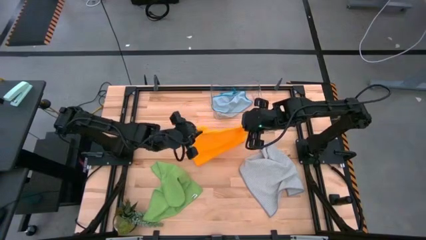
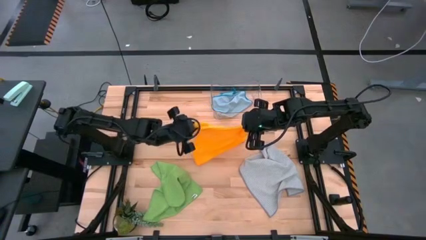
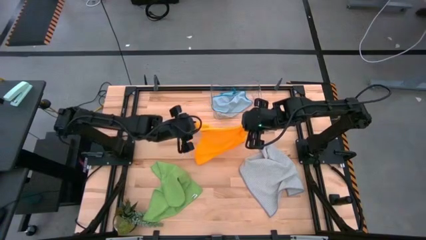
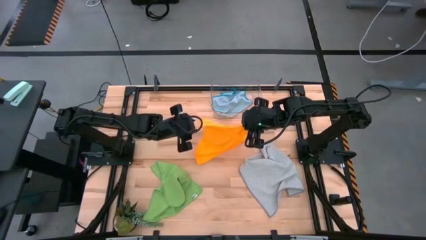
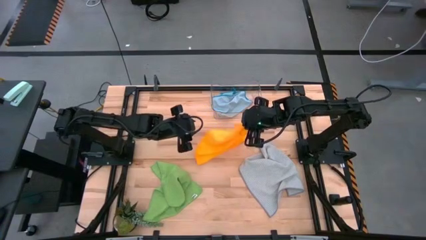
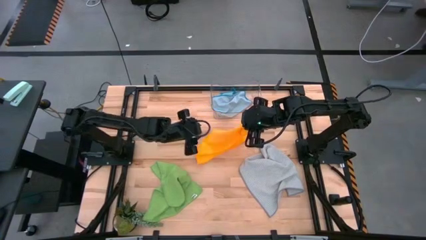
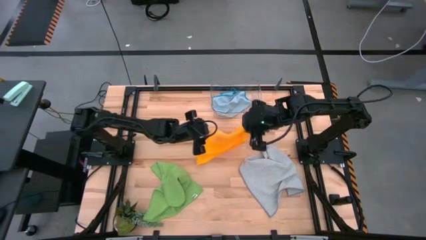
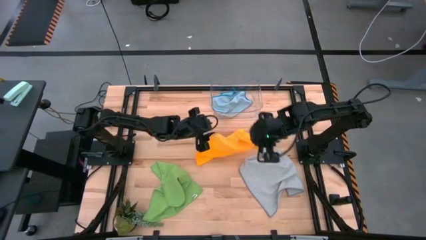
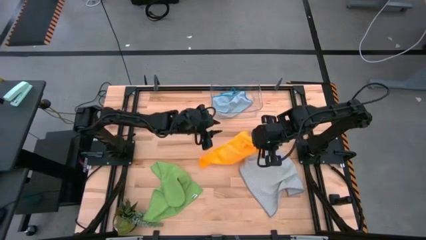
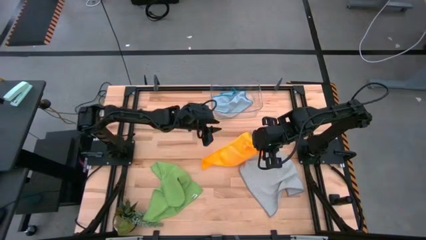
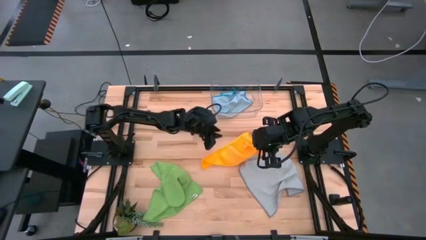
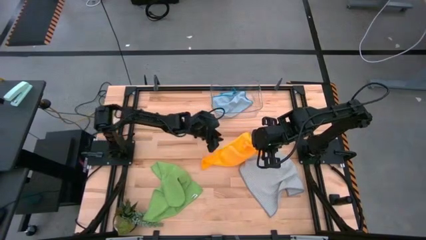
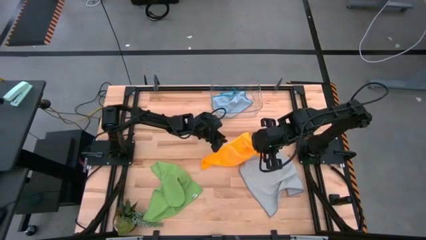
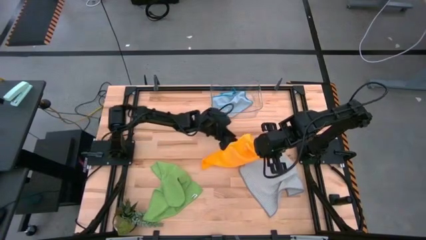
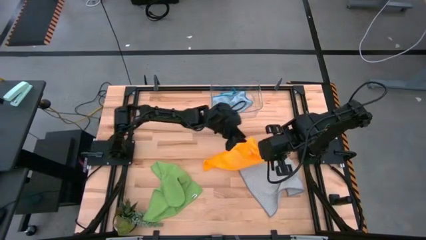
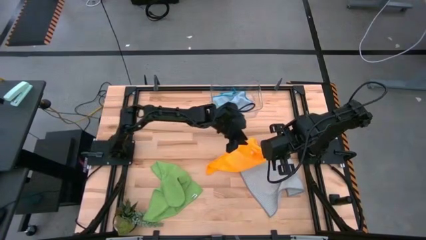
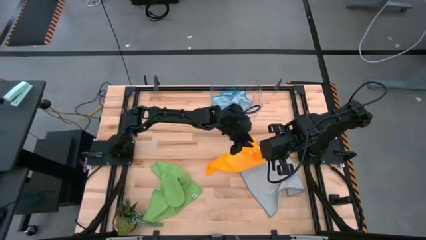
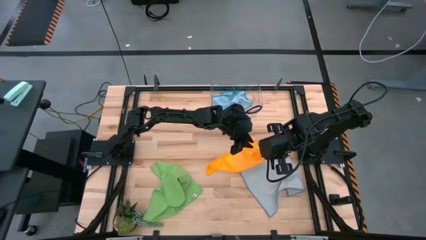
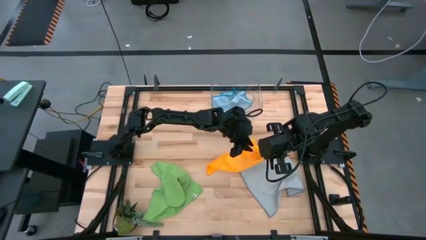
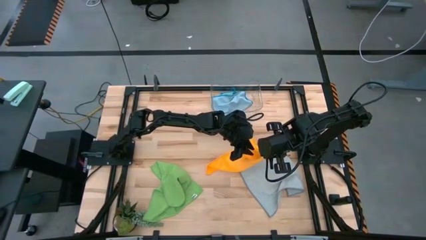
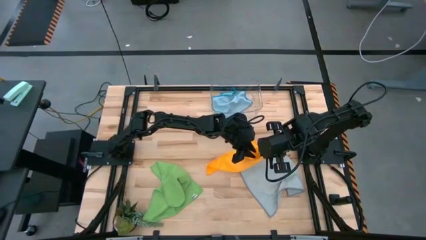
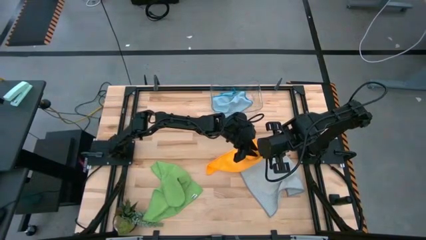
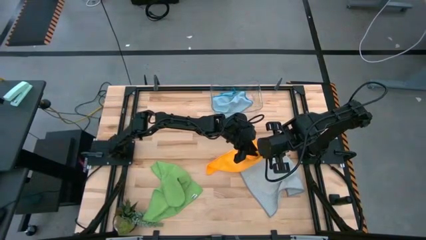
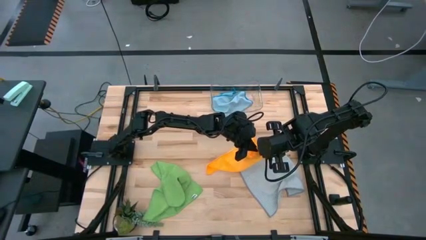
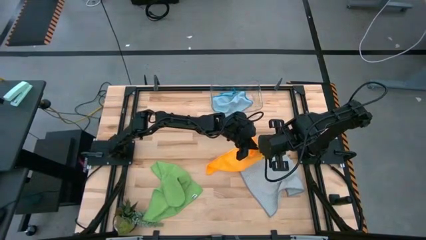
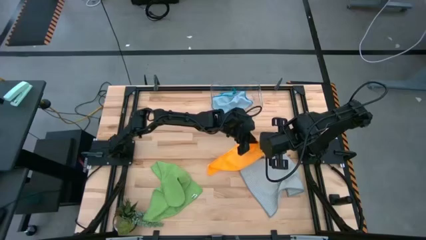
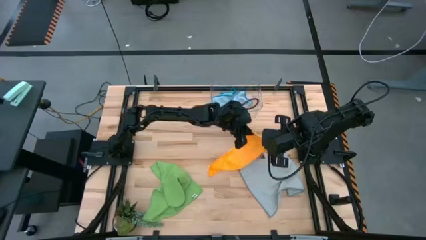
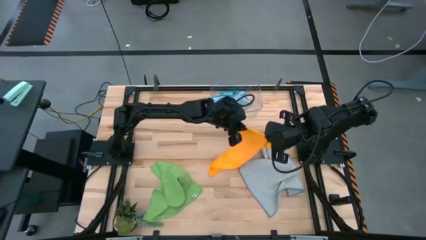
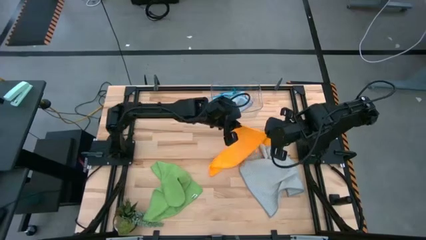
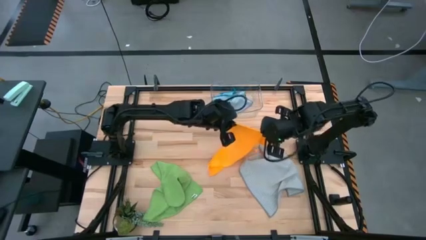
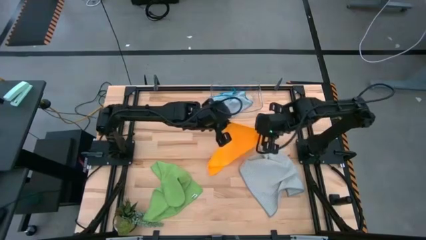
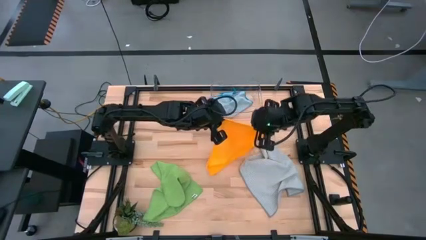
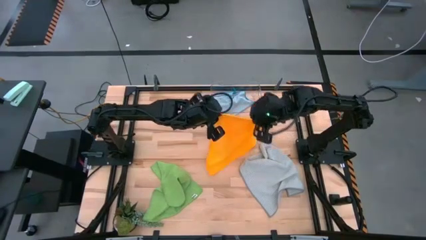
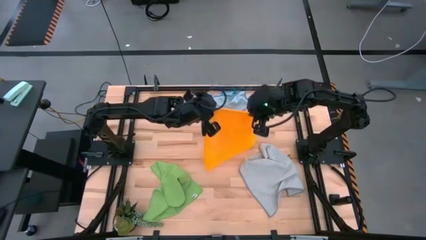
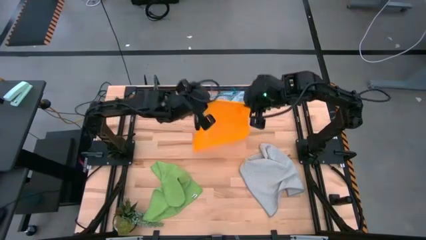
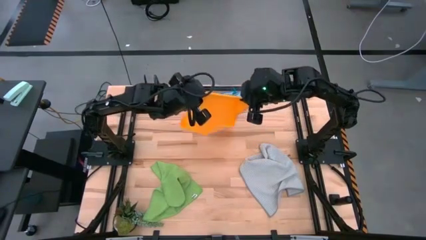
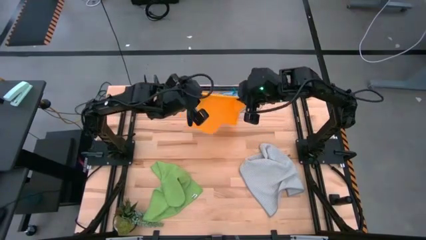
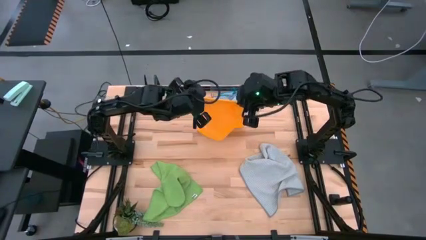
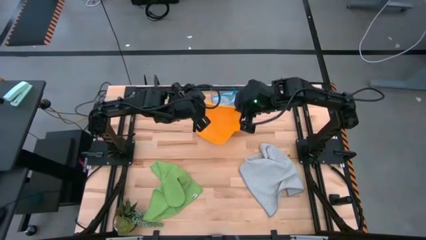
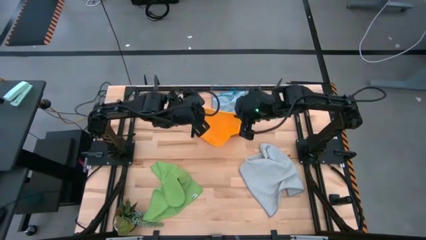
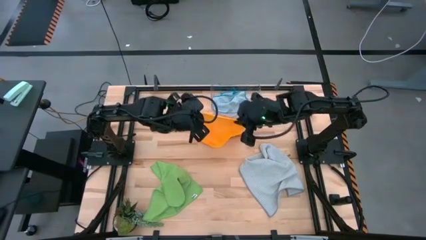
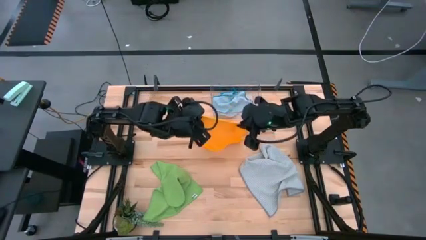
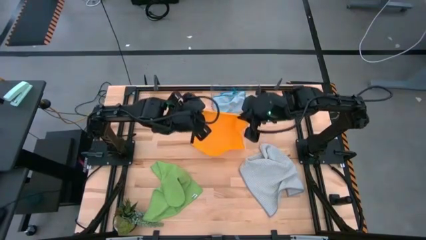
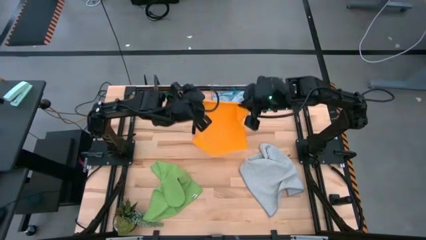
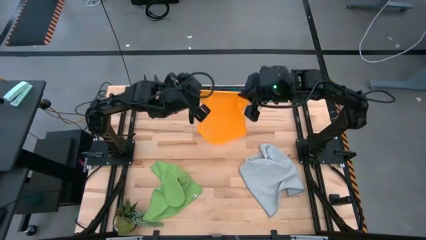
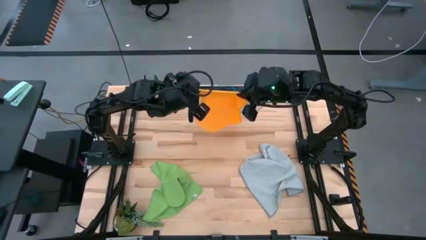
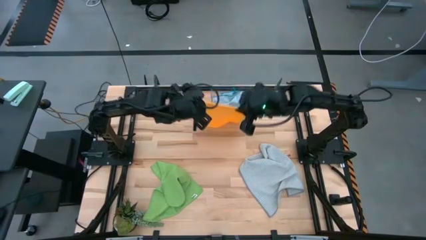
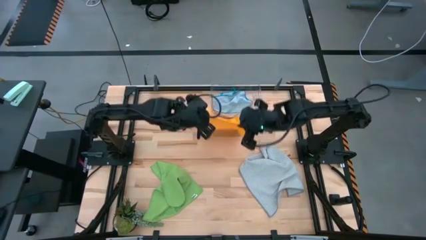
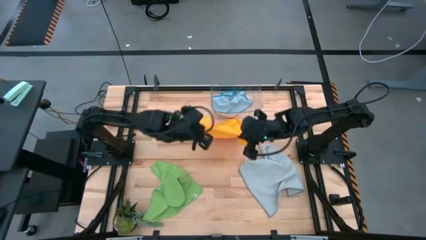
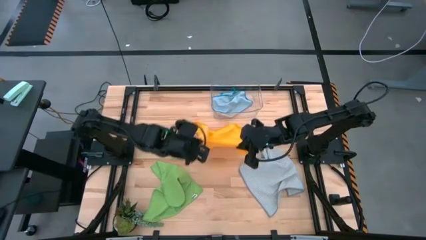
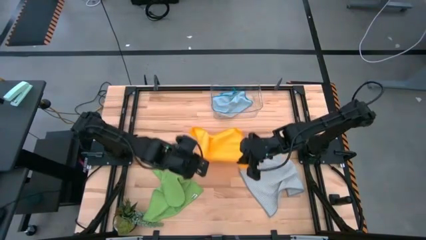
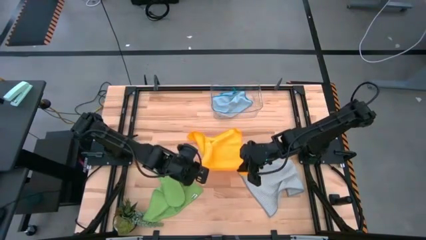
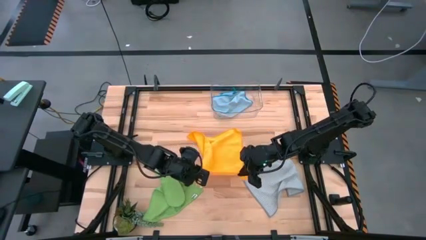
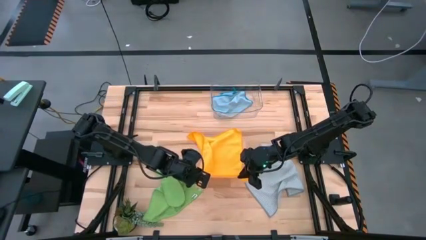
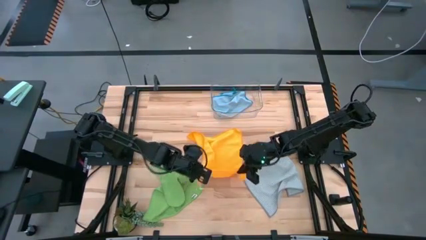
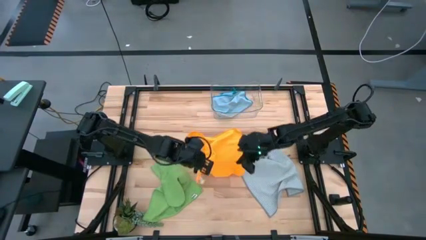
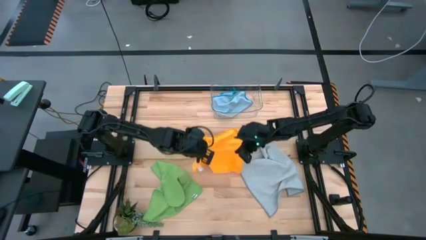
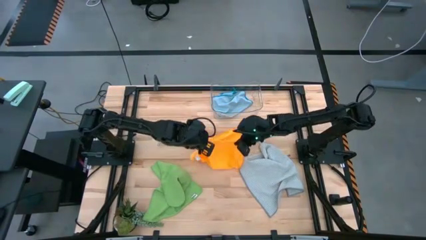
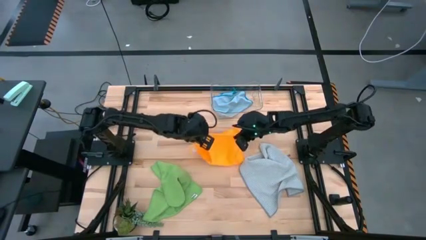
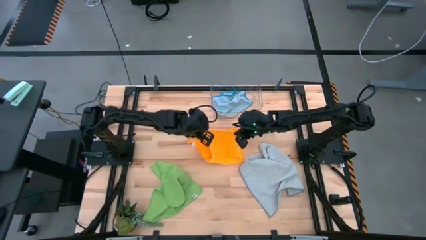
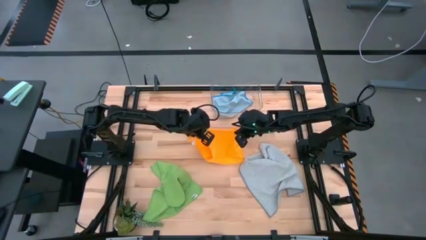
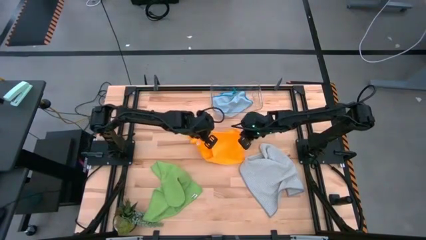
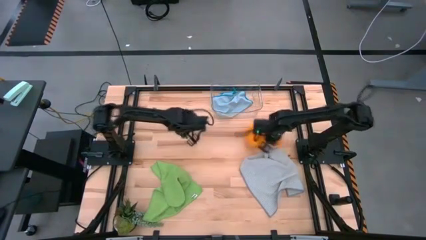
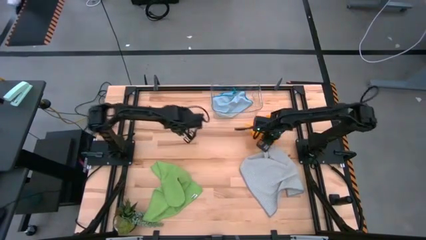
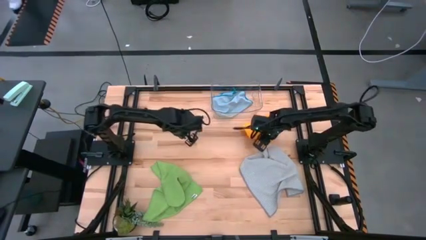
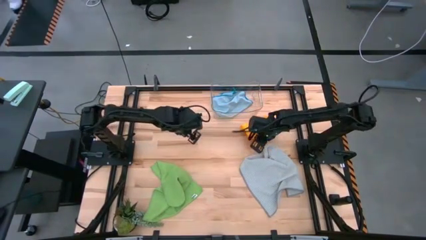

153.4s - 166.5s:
Task: Fold microfiber towels
Fold the orange microfiber cloth

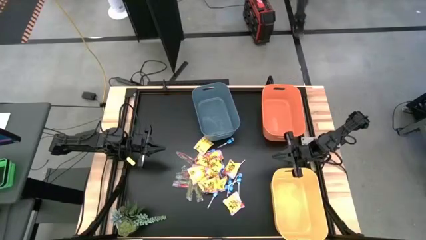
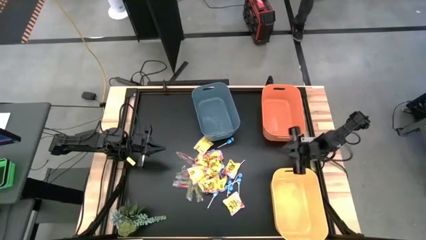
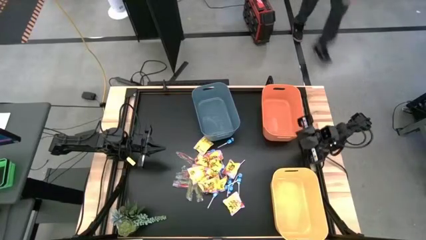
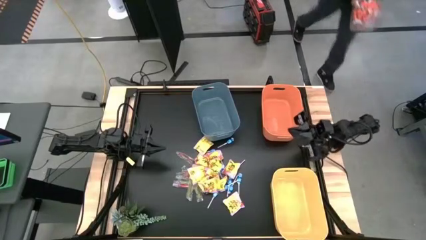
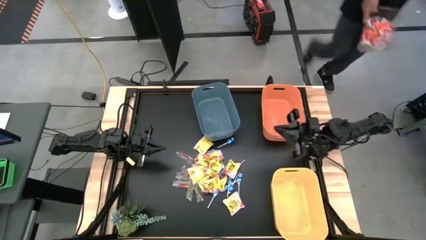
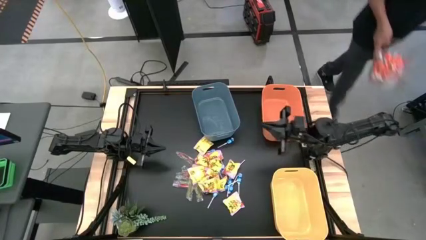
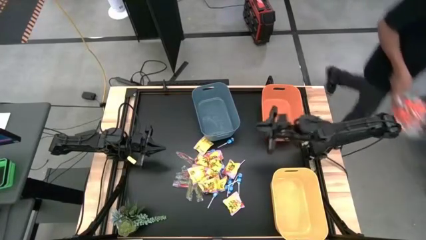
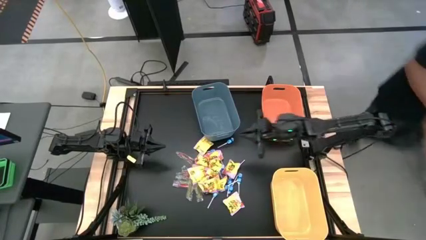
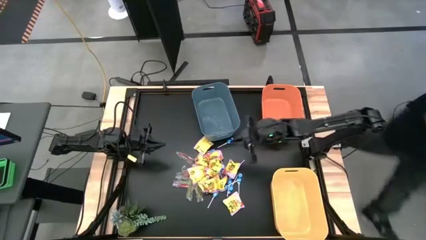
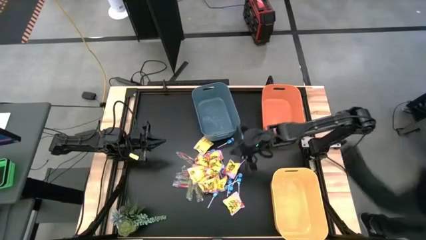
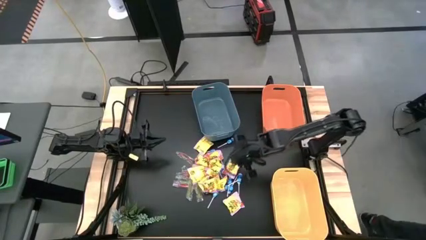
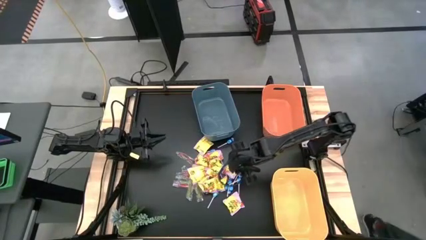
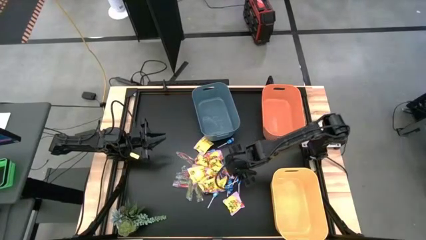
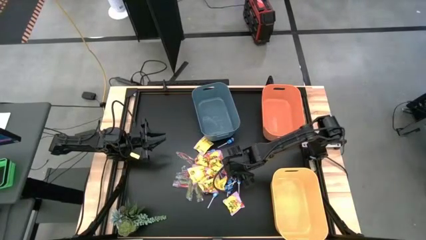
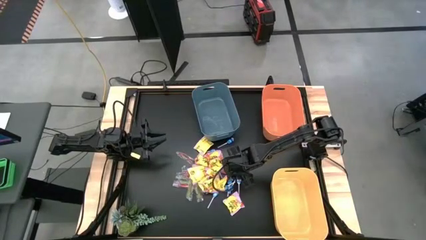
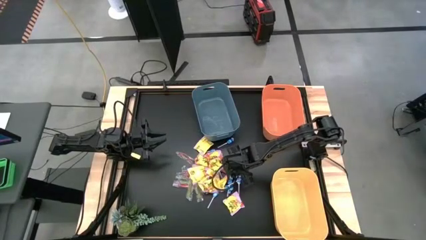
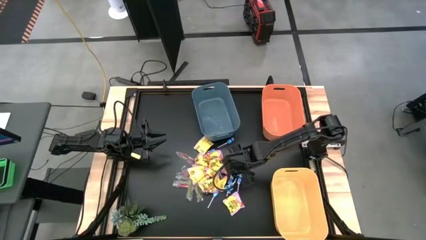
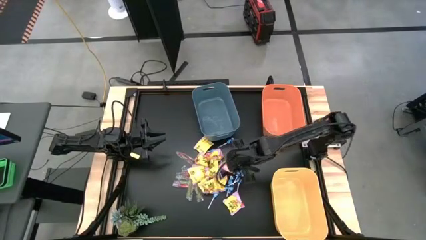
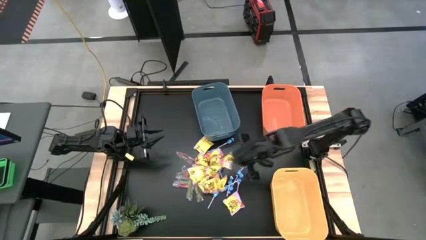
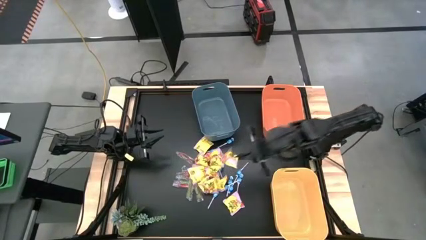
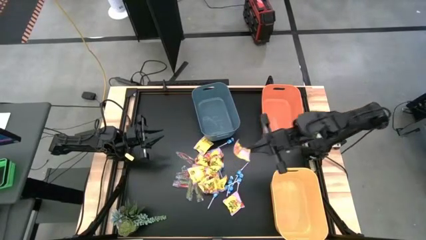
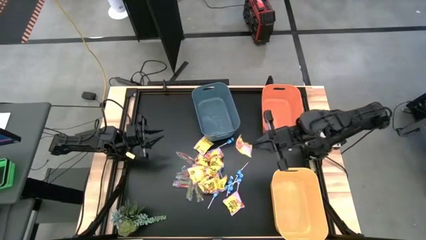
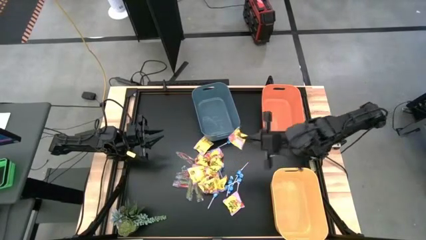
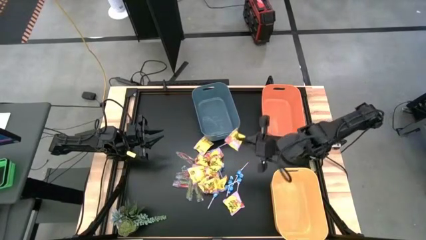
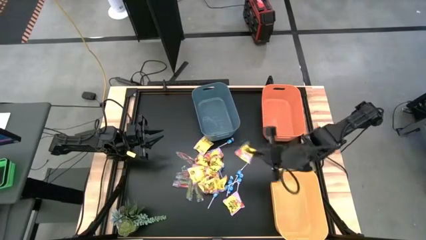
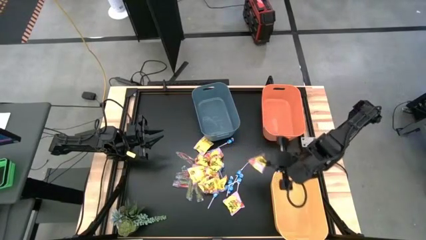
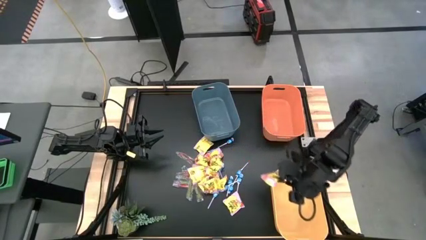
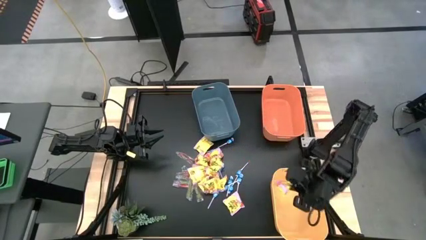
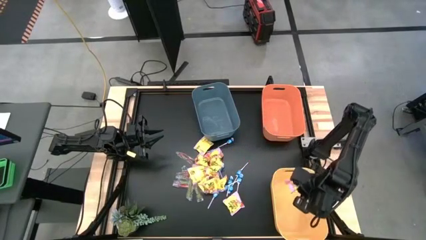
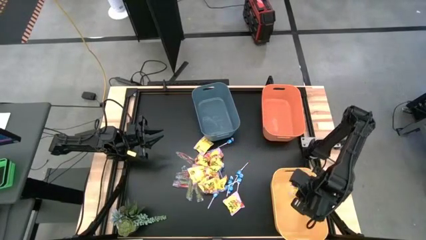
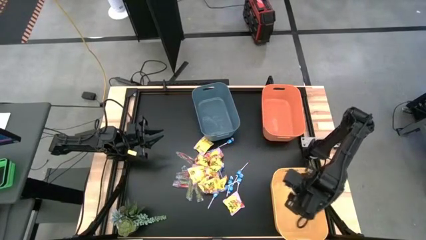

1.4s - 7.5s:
Task: Sort candy
Put the yellow candy into the yellow bin
